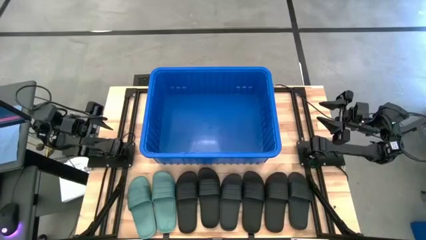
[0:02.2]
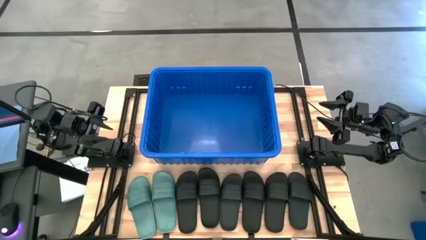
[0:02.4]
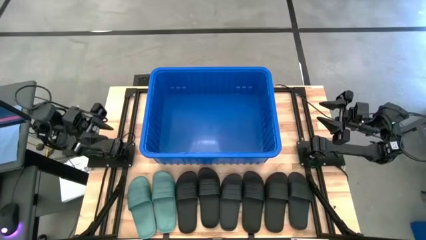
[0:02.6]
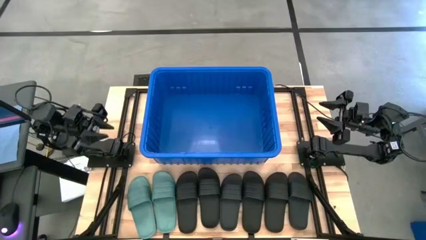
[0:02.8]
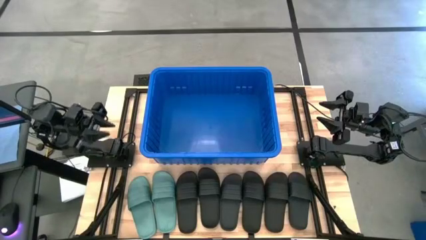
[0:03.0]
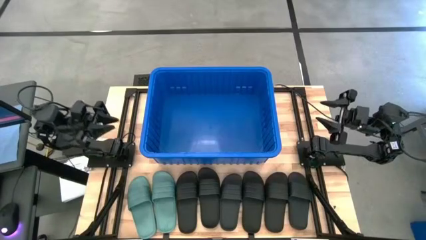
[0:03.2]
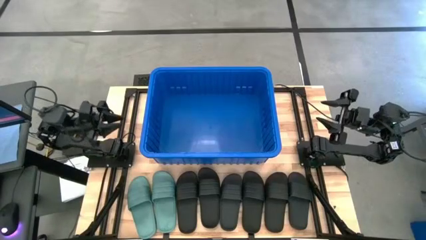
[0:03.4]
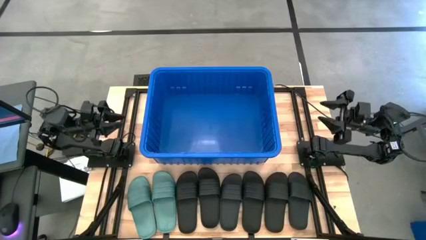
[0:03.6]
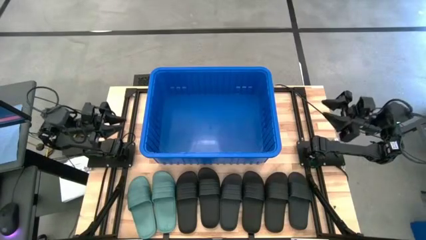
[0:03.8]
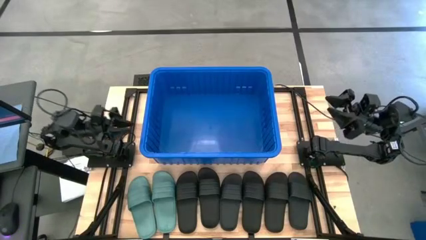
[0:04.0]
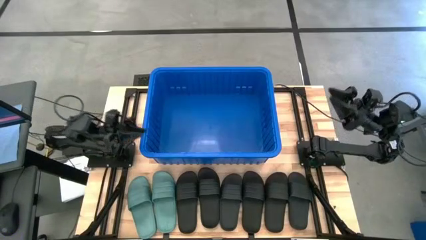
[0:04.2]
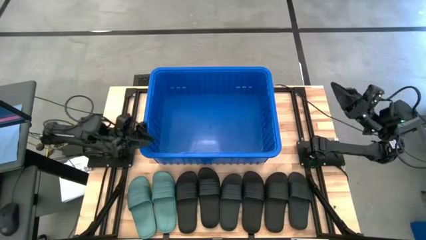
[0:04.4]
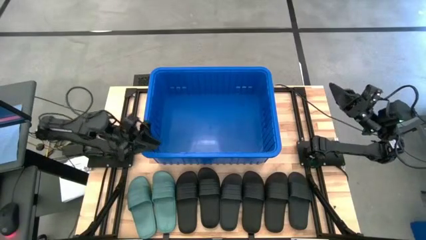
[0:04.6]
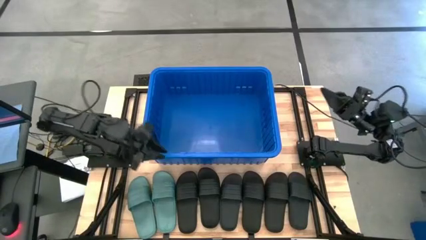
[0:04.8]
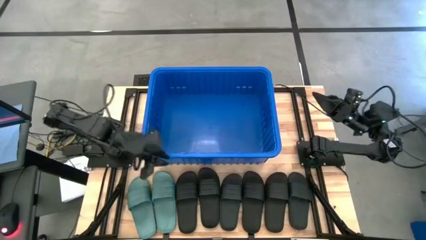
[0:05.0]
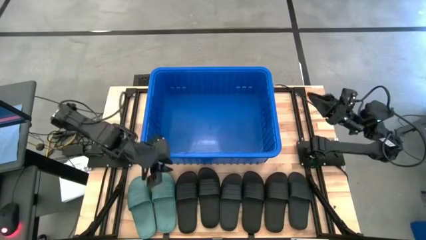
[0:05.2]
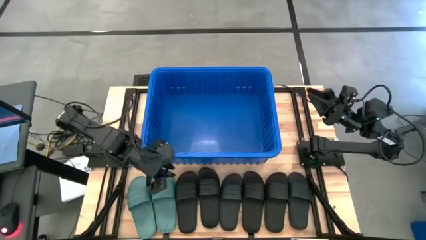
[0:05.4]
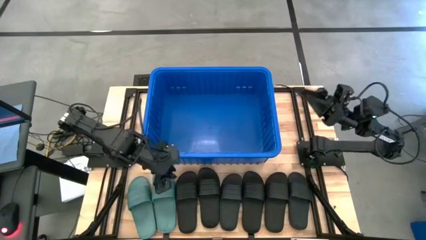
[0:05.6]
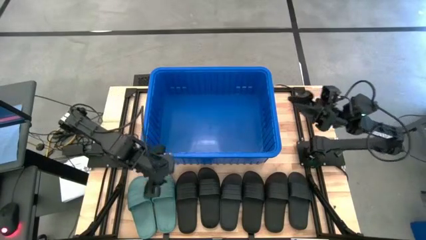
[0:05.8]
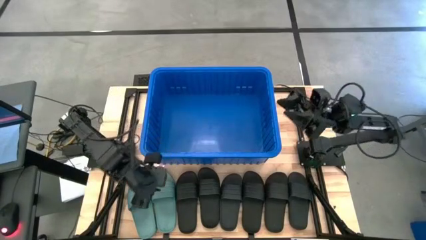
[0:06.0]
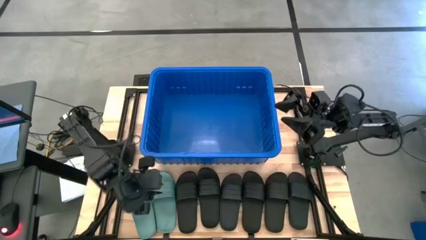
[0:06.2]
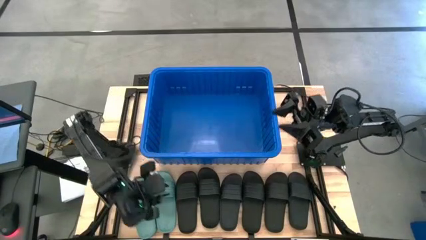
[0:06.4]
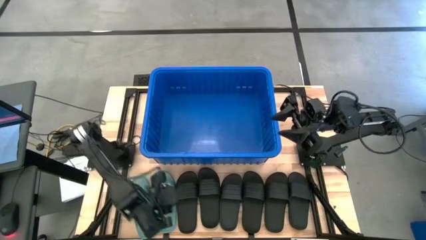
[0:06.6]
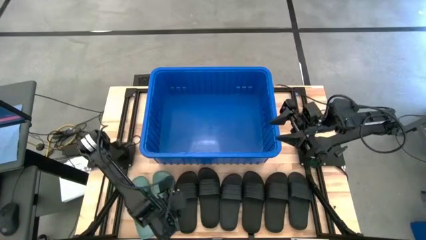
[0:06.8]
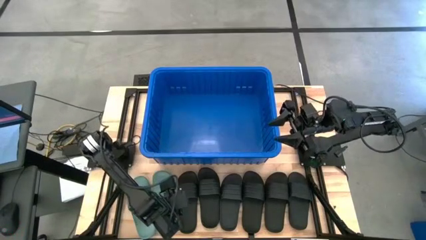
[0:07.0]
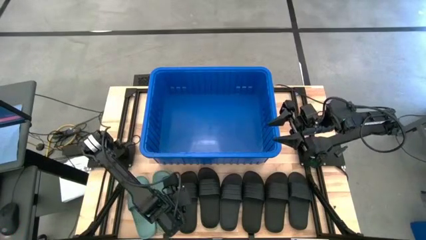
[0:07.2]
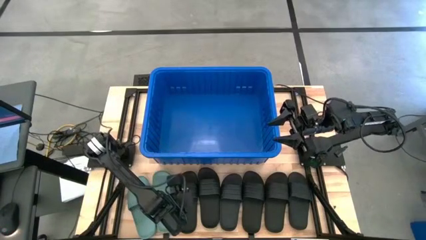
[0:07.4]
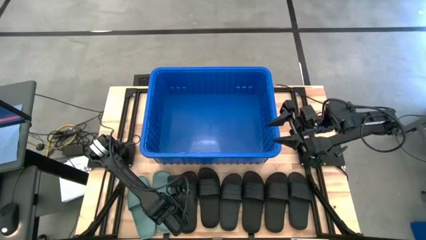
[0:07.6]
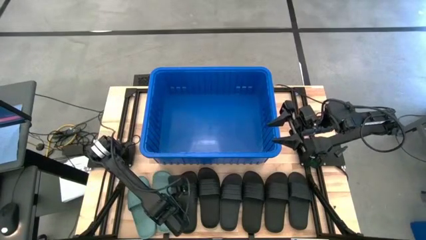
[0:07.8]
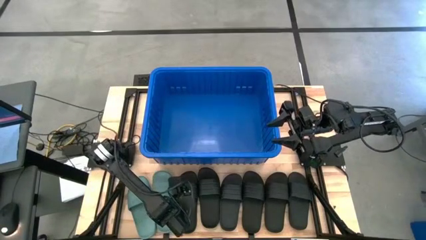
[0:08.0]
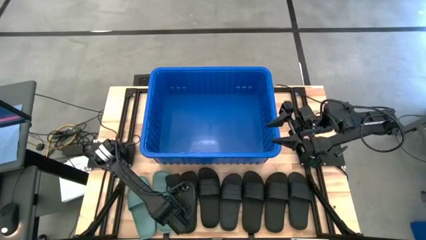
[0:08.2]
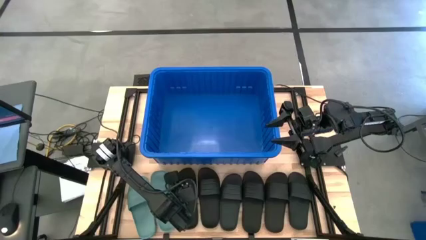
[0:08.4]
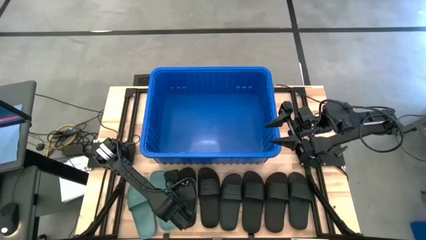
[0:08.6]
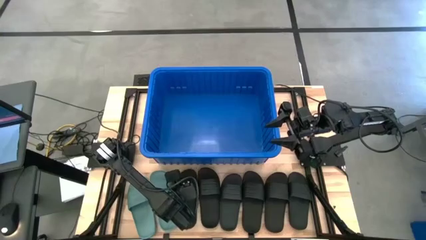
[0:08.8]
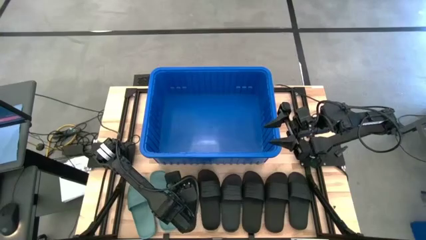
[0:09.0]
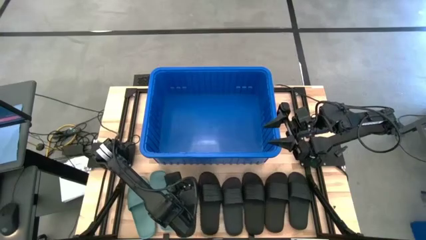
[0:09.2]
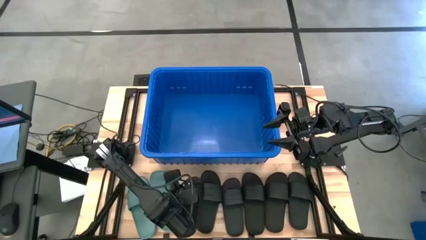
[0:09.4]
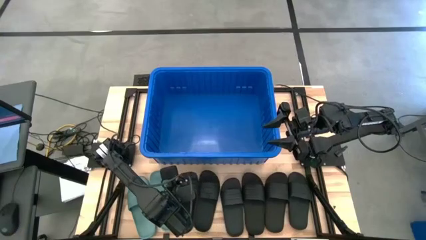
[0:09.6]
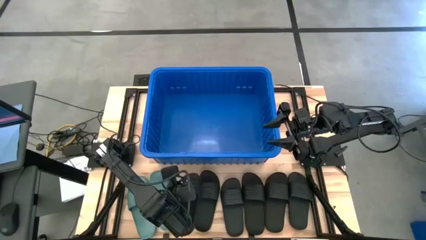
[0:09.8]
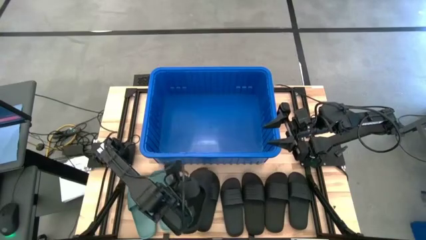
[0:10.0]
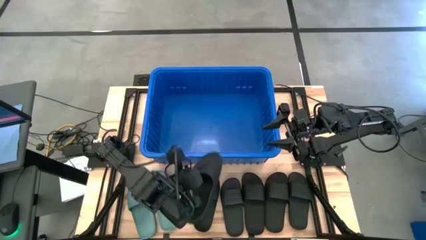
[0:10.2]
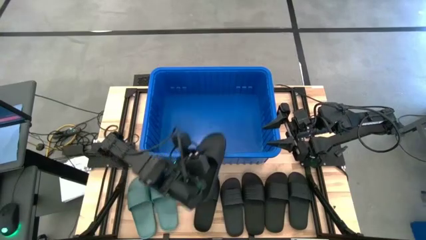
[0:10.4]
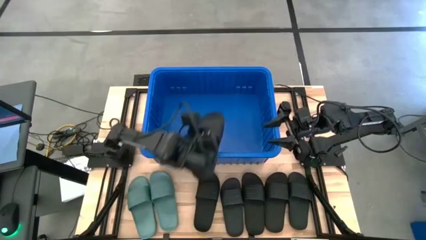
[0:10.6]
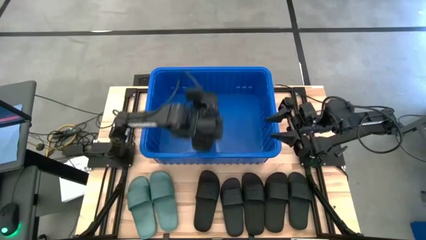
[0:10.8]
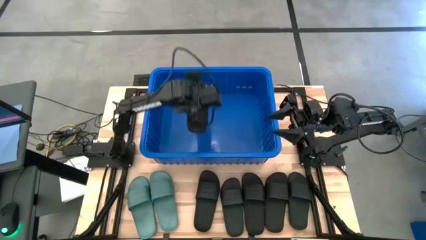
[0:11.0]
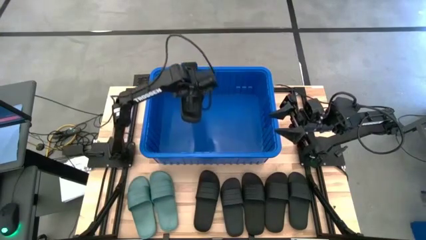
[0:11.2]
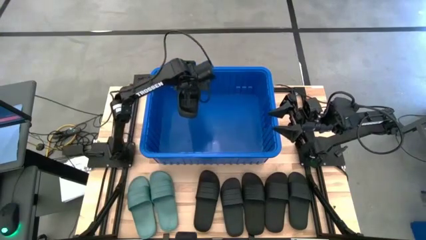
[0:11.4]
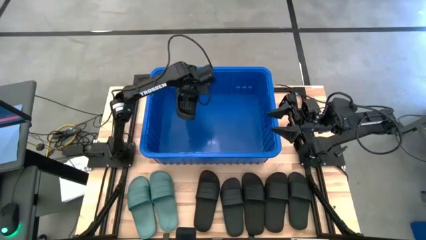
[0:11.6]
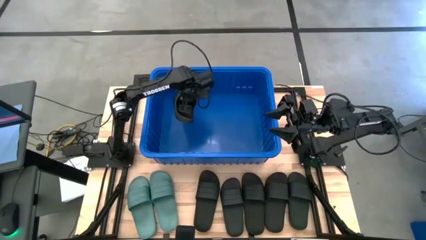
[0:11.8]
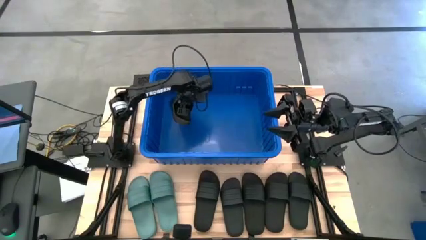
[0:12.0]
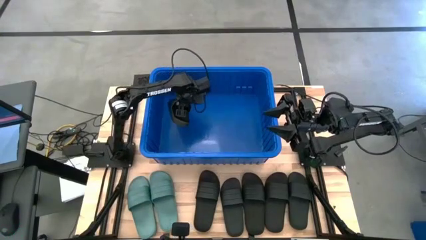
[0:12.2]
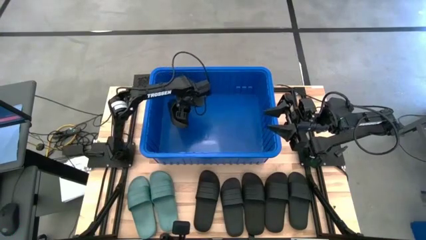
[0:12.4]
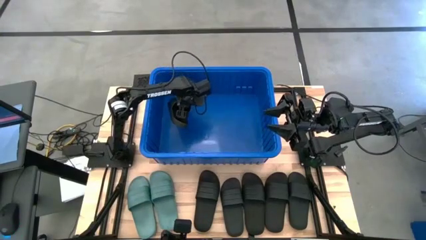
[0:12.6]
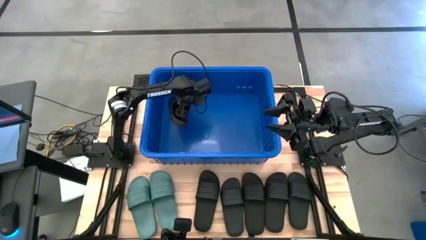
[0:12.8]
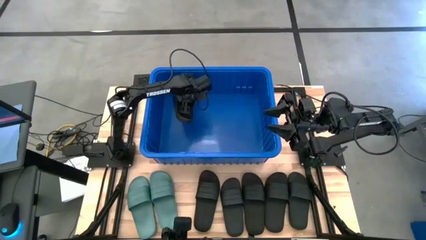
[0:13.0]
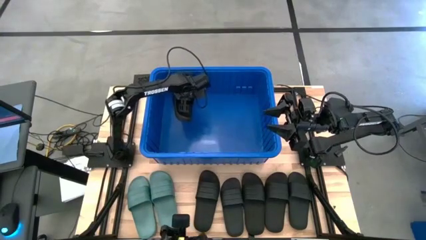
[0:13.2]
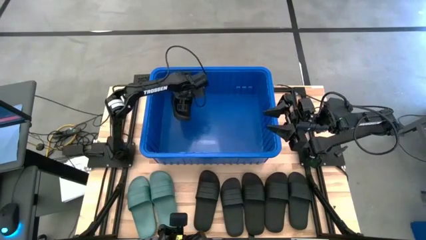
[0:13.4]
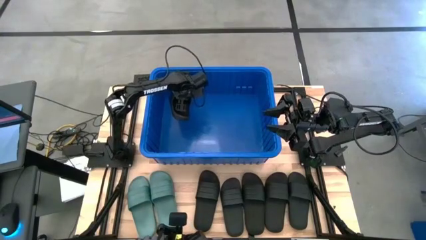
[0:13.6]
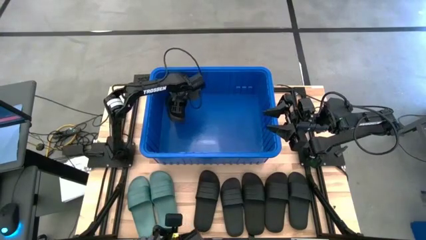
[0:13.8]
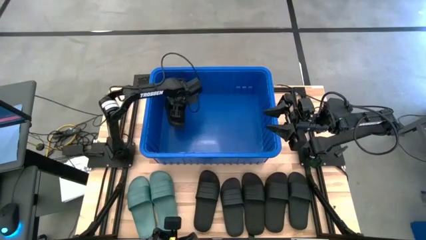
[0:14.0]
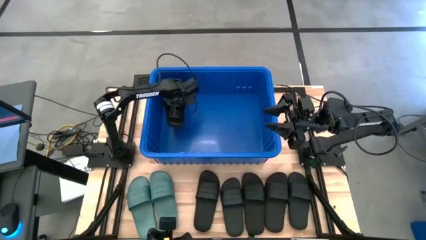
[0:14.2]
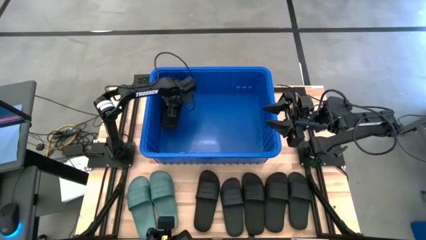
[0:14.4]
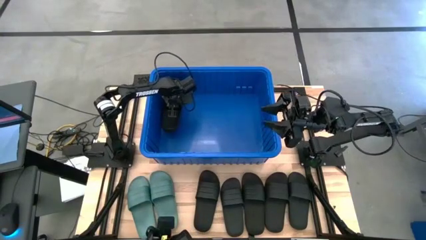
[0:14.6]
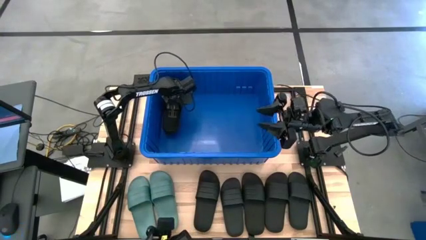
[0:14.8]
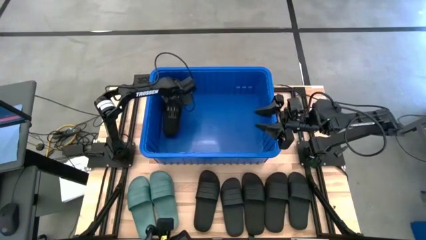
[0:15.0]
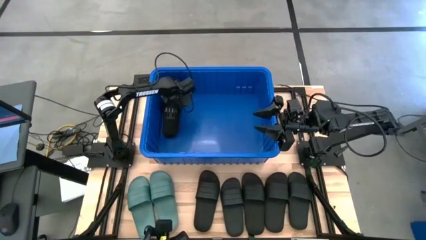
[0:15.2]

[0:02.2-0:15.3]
Task: Pick and place slides into bin
Put the black slide into the blue bin

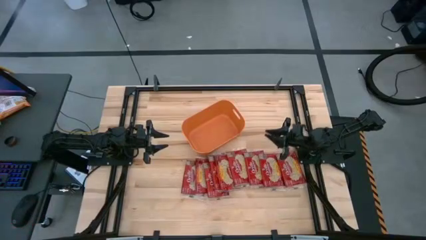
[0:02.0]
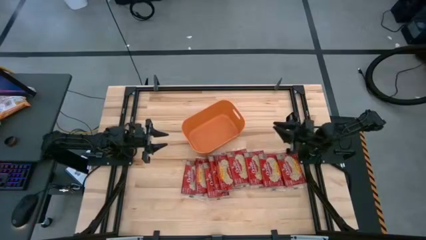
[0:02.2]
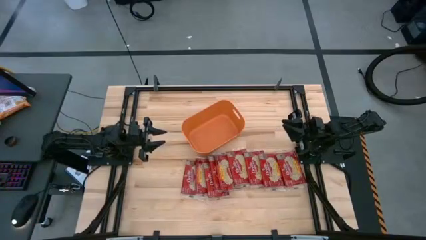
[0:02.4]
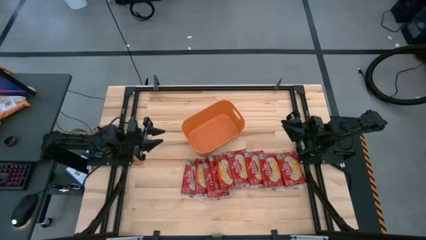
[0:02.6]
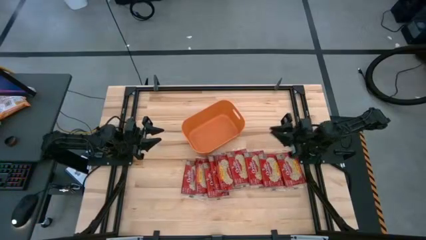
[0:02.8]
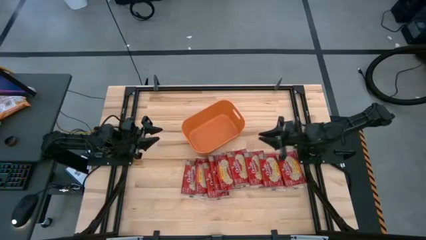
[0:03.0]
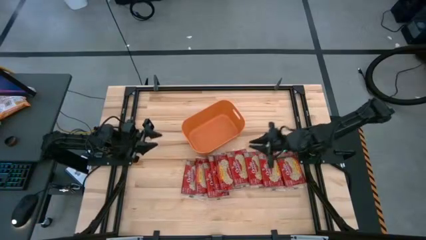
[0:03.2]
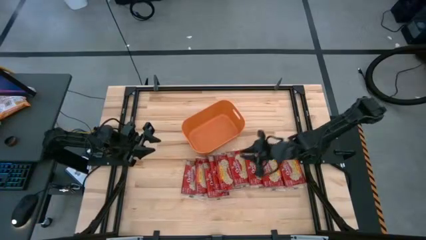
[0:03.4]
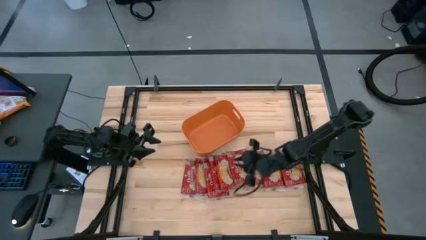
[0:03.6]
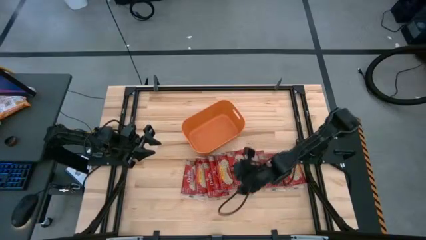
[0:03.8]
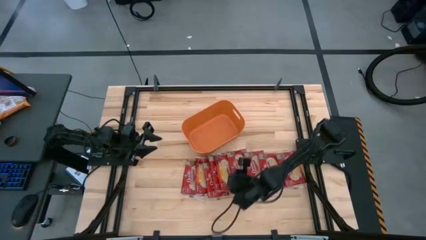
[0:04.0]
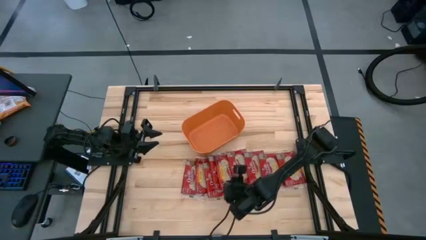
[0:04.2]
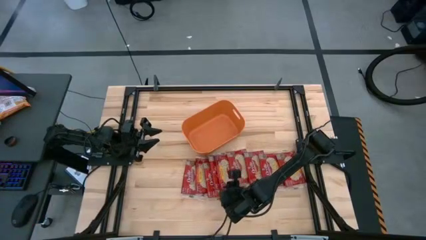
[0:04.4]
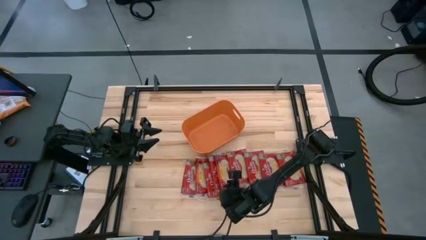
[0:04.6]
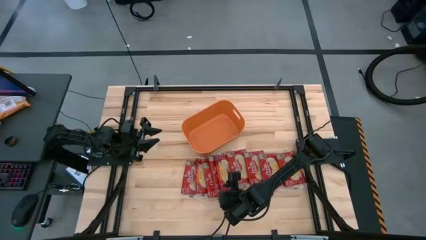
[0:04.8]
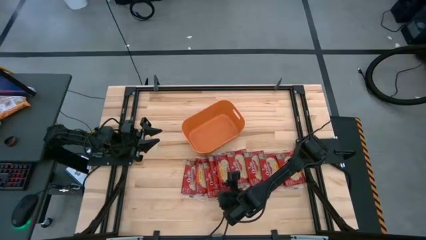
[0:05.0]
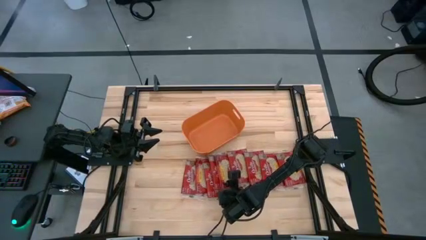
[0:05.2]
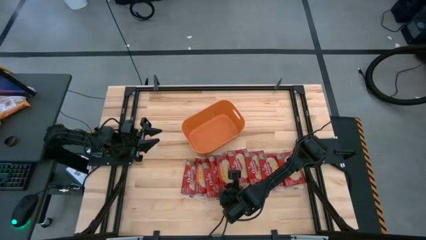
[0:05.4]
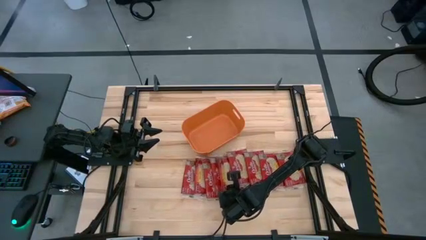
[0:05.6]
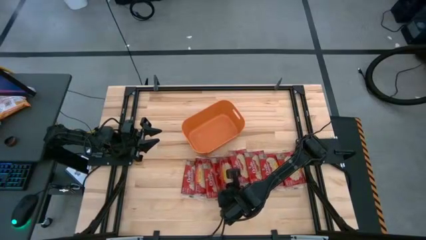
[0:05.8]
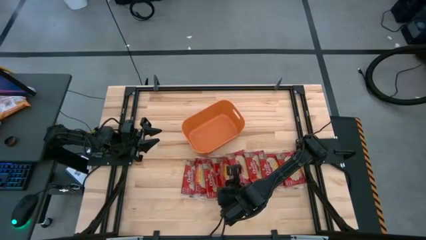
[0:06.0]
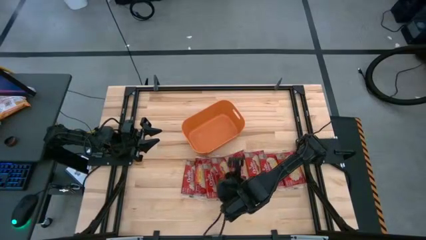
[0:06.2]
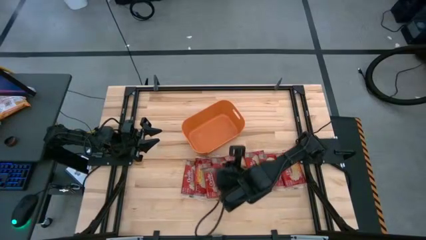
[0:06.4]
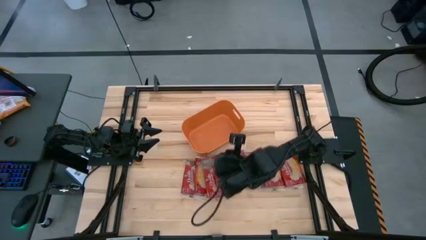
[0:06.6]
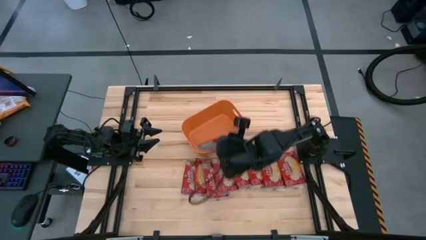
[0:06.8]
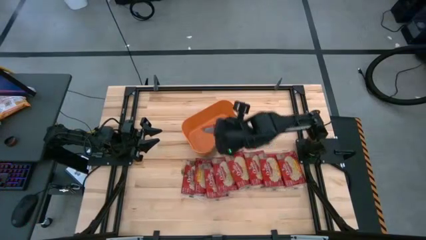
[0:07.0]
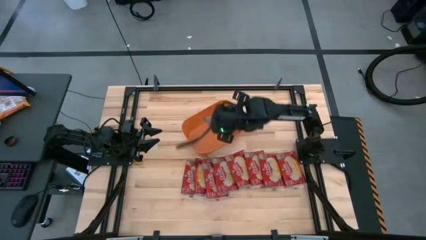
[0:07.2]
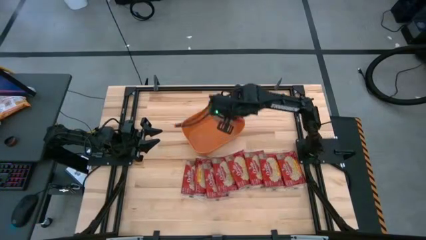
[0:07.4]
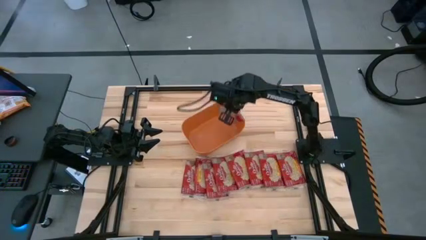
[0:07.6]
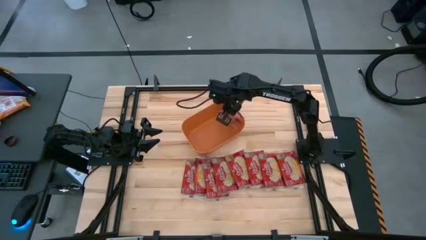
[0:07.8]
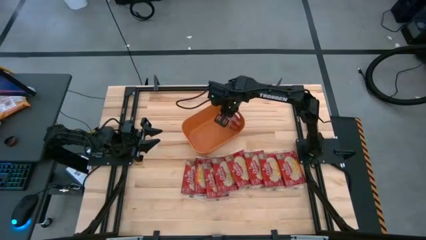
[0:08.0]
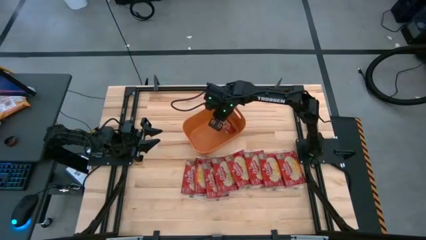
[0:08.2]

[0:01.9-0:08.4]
Task: Sort popcorn bags into baskets
Put the pop corn bag into the orange bin
